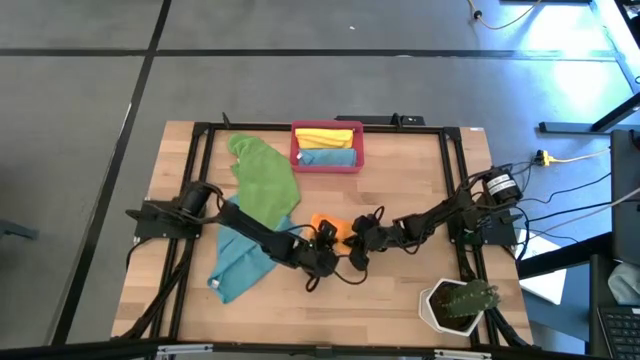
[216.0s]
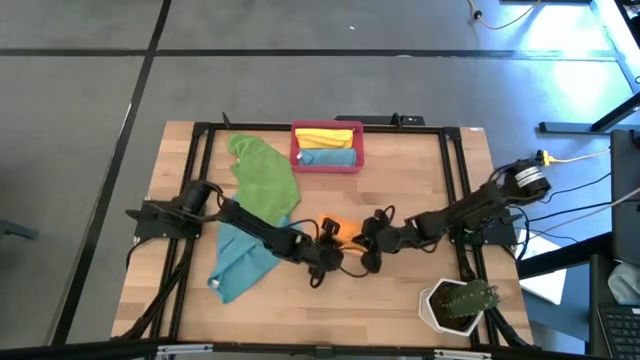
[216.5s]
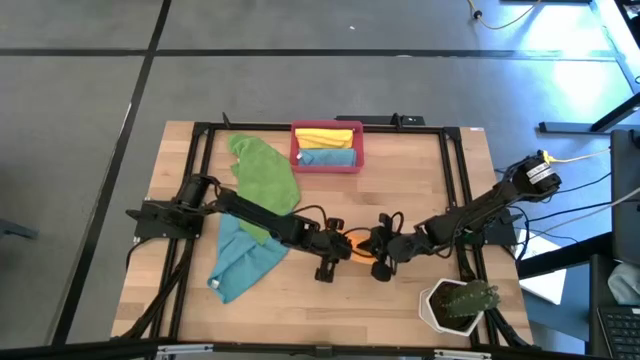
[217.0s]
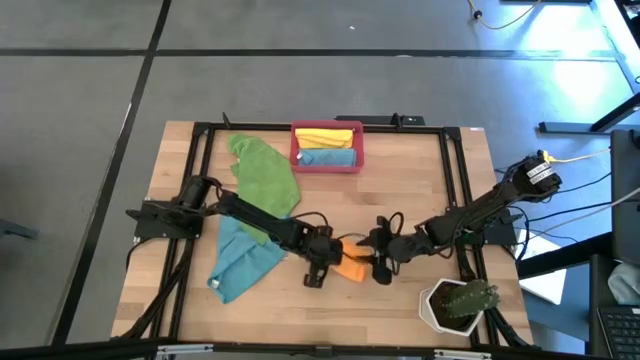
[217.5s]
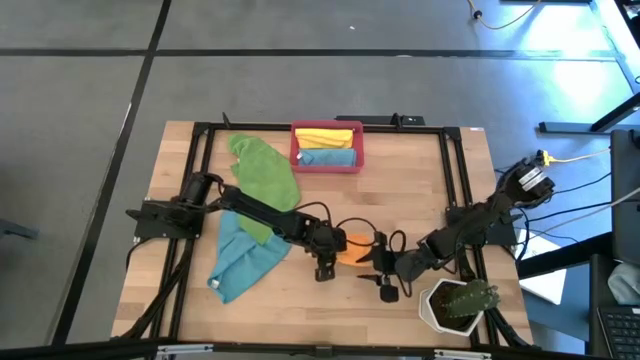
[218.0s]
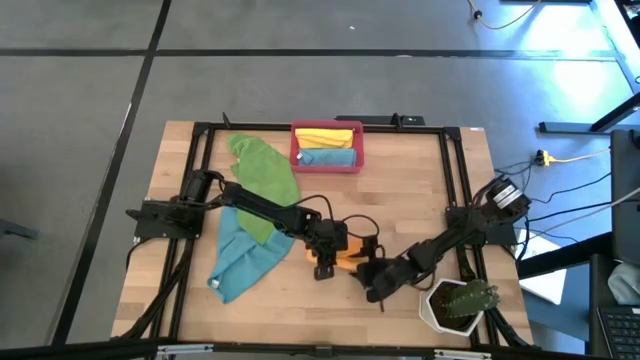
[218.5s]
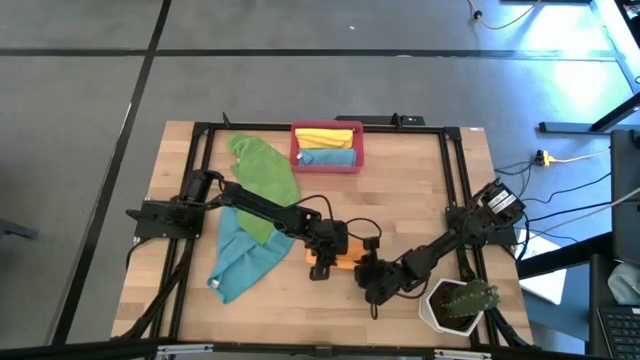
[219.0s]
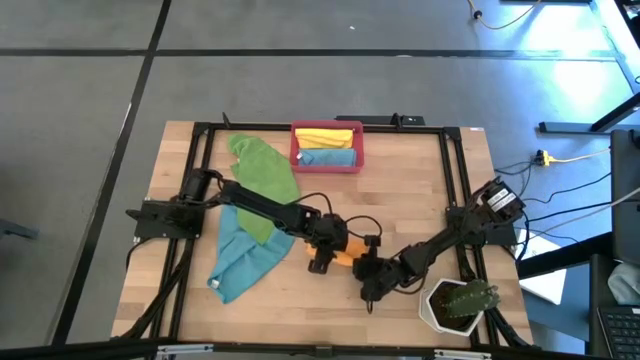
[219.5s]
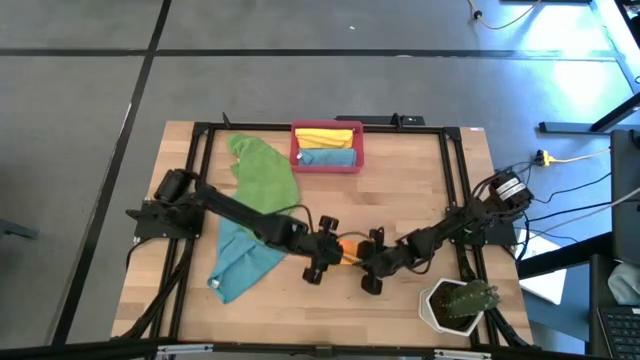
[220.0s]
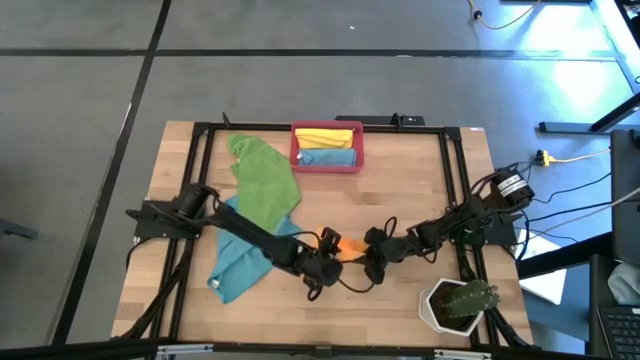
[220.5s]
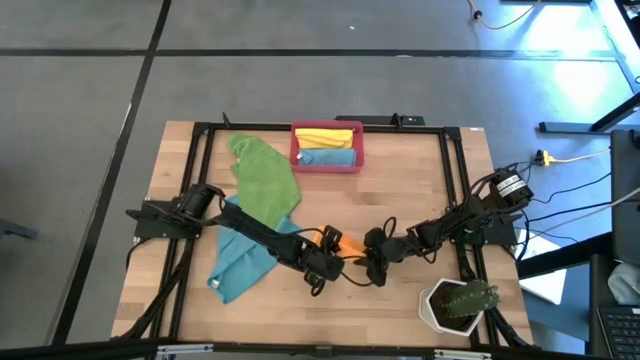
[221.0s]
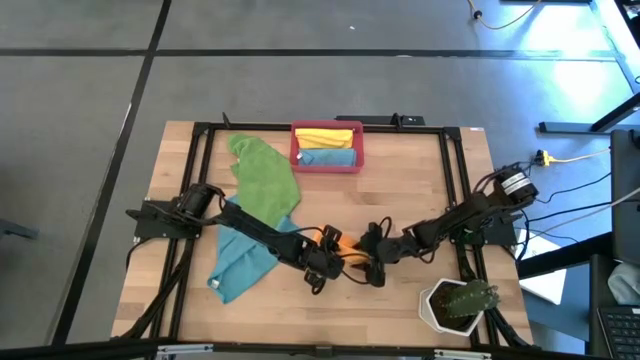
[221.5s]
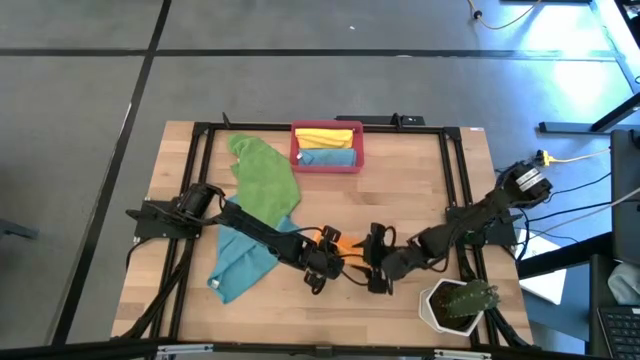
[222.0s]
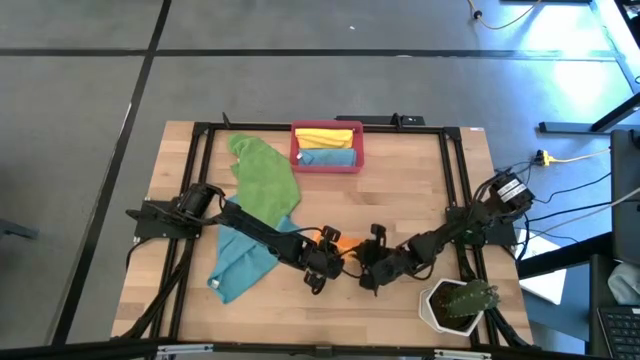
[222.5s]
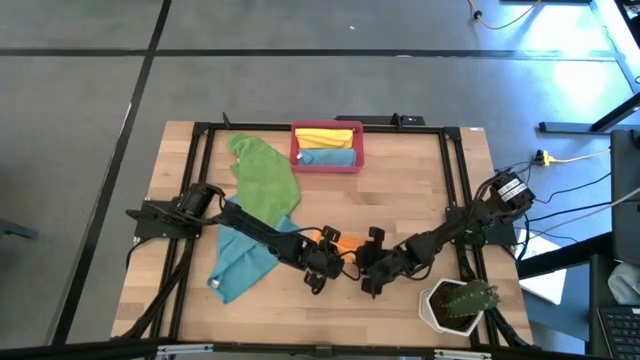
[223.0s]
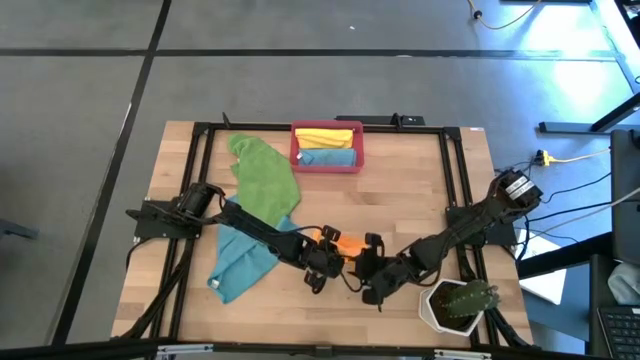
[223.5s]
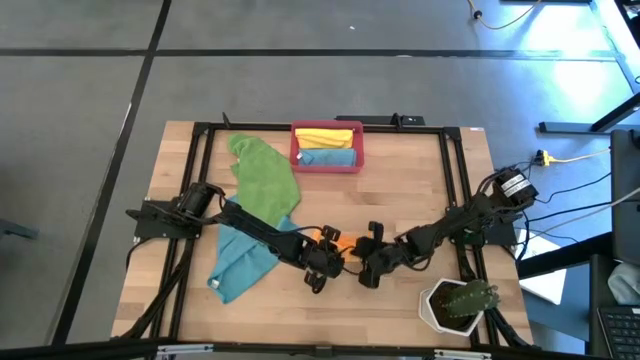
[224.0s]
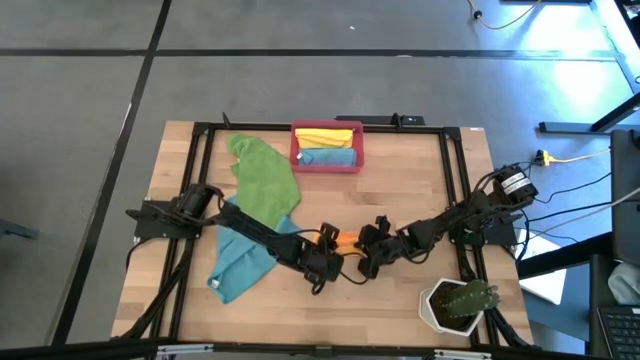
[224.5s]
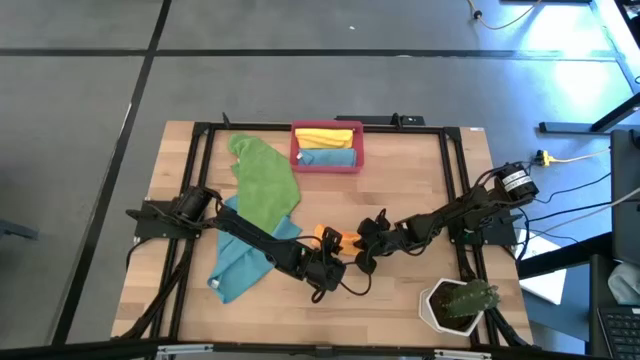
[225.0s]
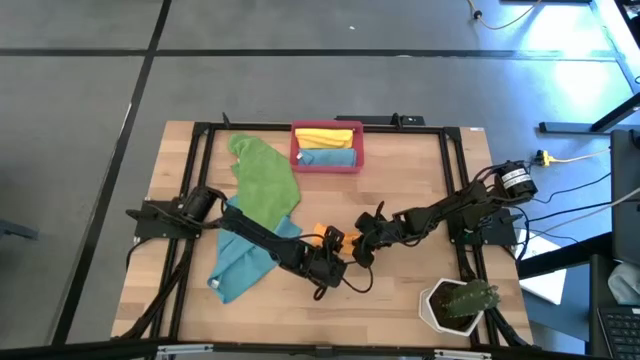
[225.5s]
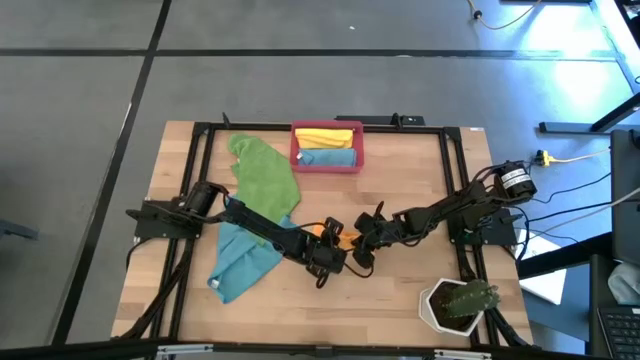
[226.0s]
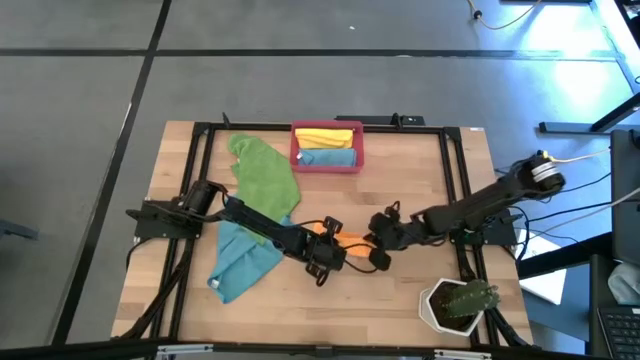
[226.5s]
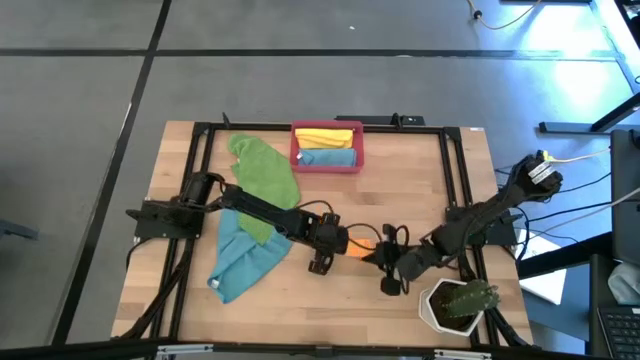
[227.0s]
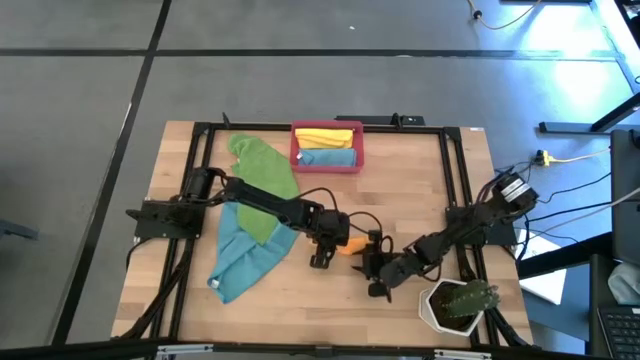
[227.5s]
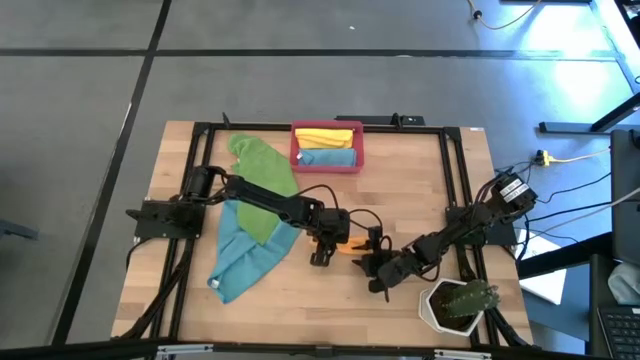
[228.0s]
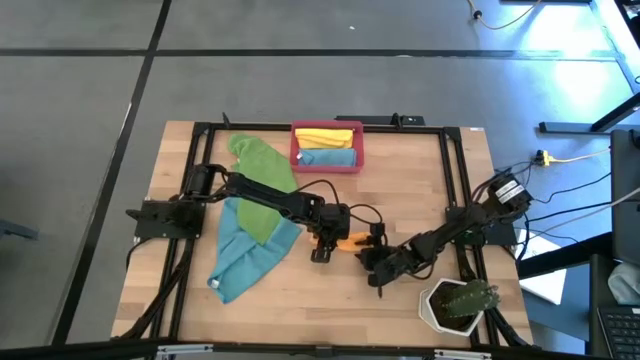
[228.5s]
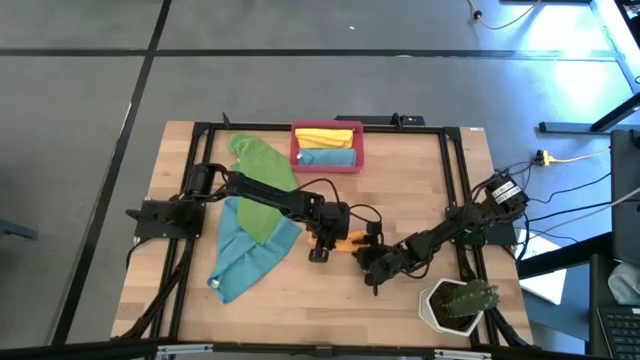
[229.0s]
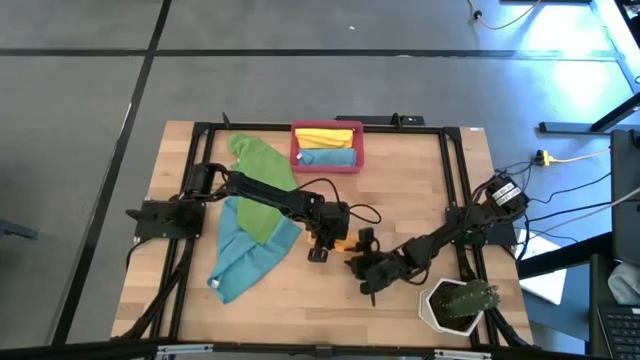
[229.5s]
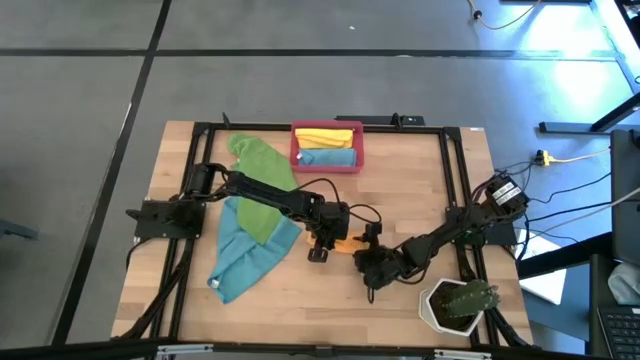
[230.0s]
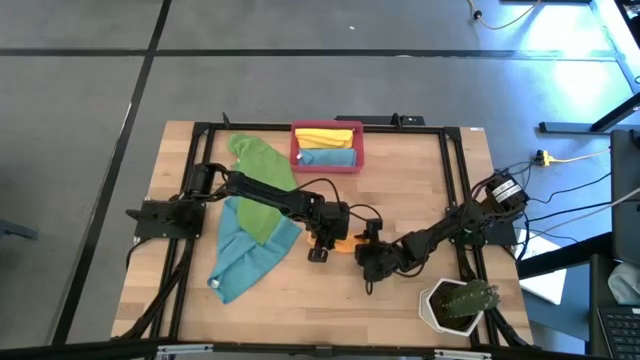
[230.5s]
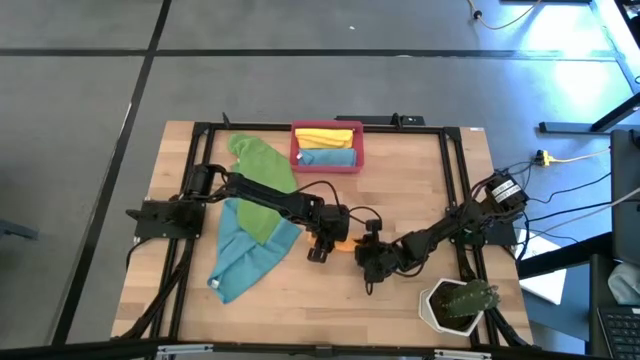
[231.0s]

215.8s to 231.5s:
Task: Roll microfiber towels into tight, uniform cylinder then place into a basket
Roll the orange microfiber towel

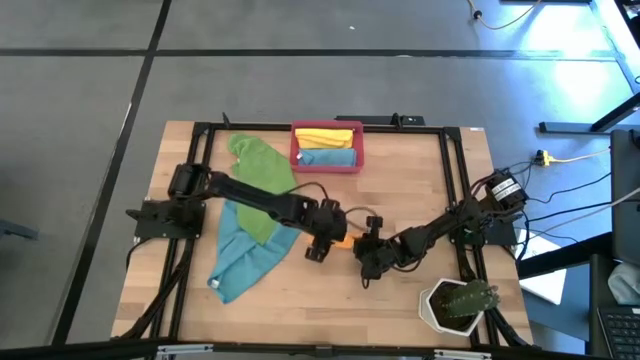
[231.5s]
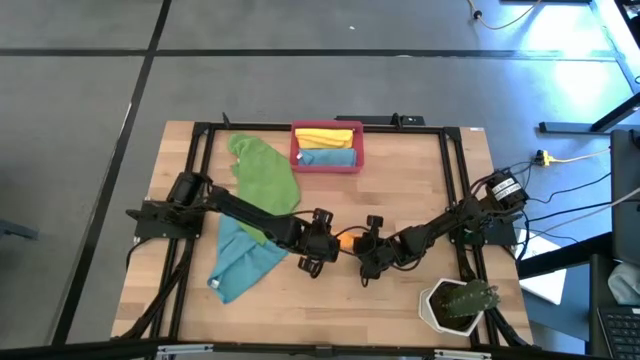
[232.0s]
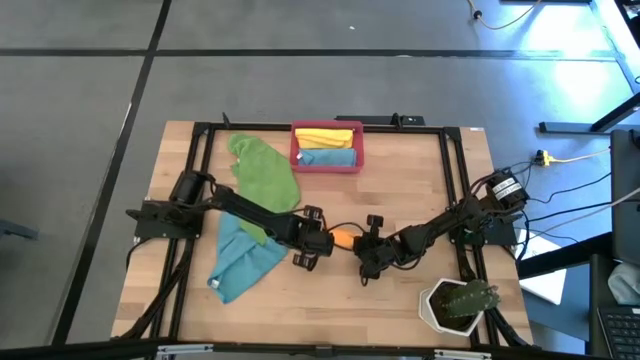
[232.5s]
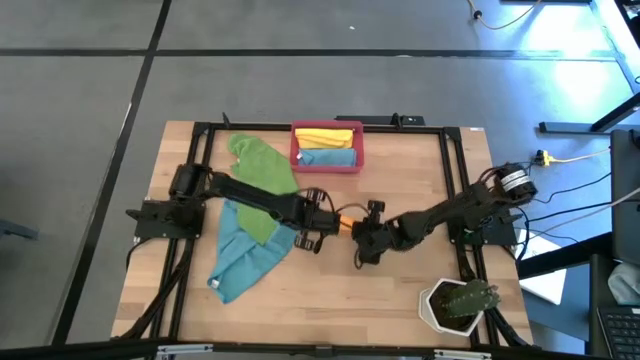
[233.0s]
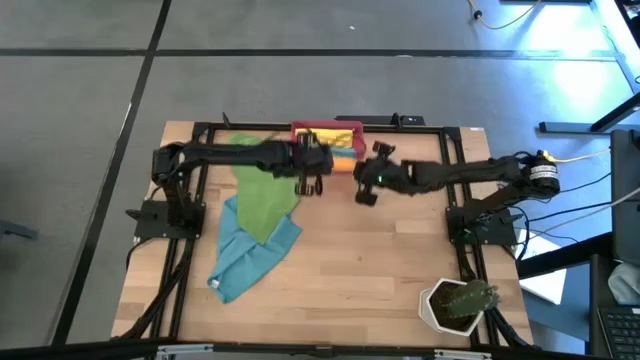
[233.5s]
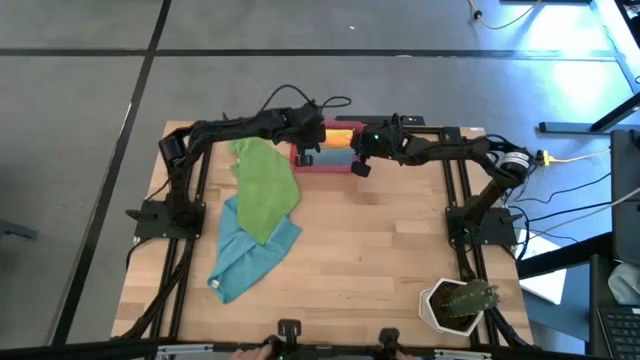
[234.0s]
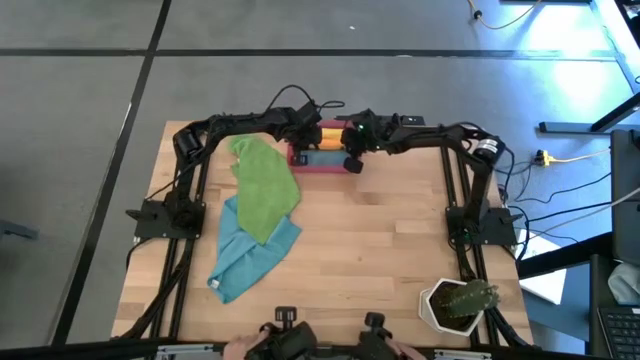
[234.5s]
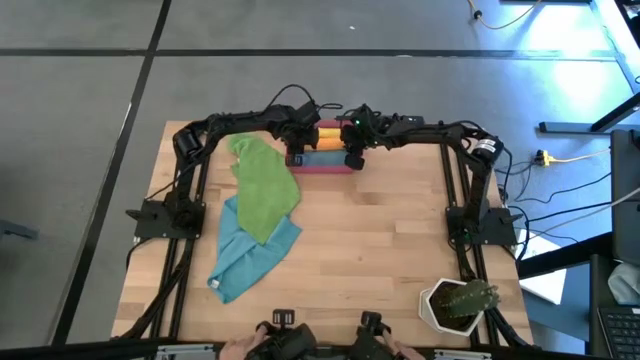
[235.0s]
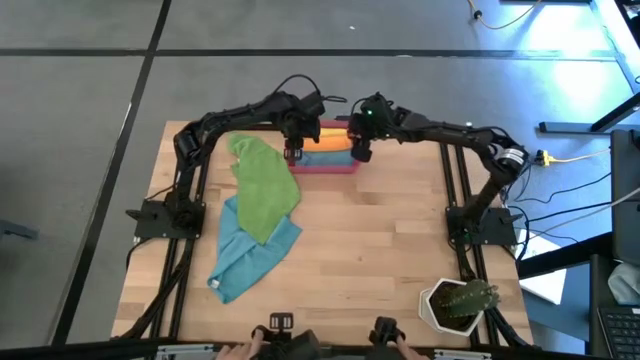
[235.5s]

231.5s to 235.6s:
Put the orange microfiber towel into the red bin

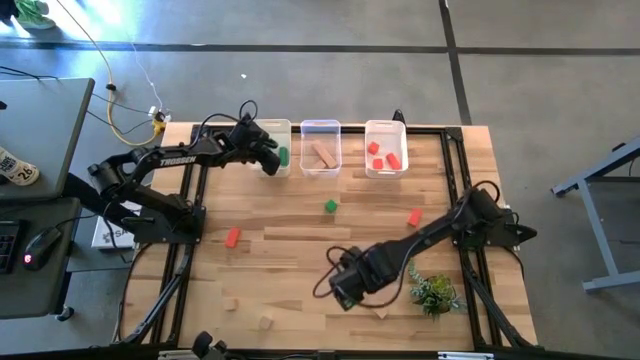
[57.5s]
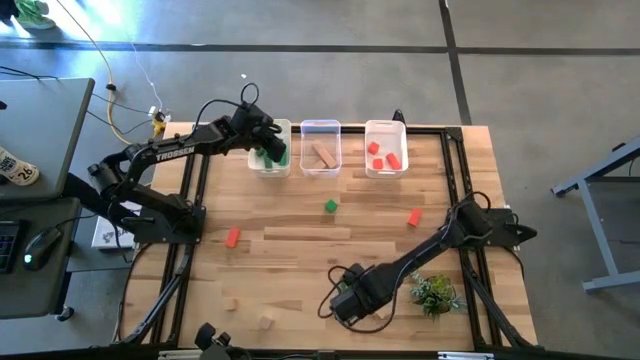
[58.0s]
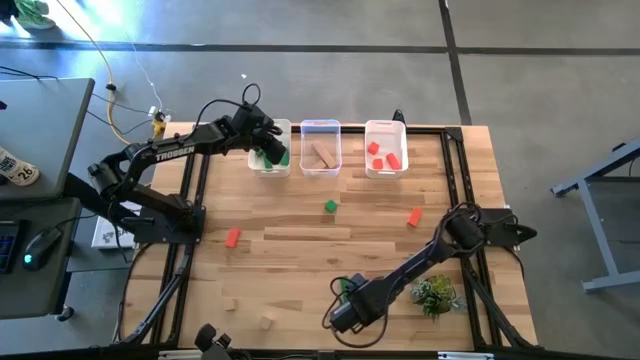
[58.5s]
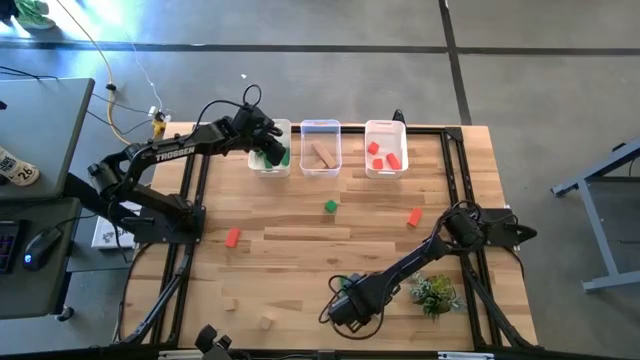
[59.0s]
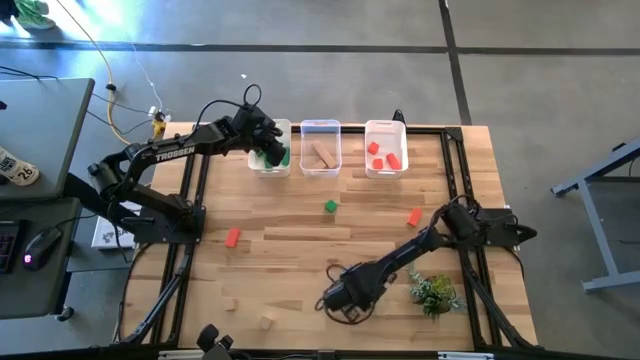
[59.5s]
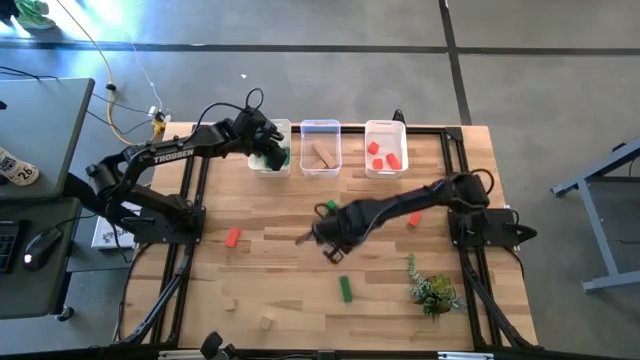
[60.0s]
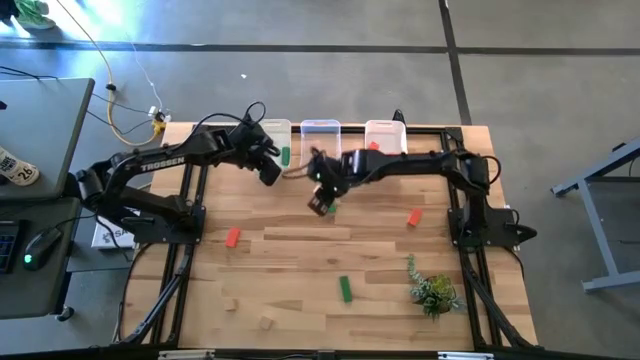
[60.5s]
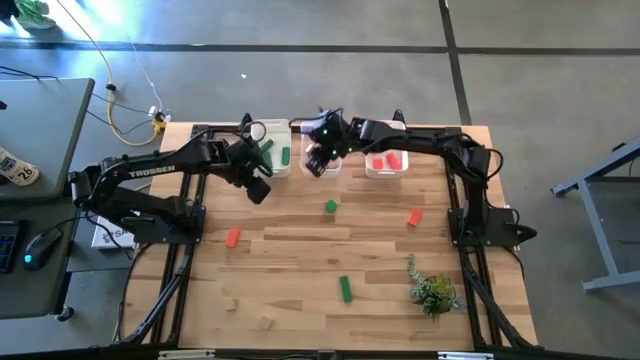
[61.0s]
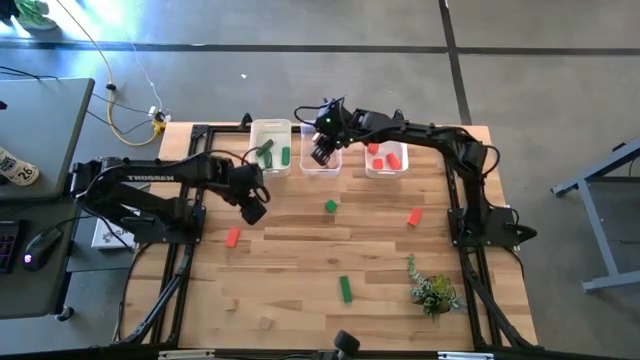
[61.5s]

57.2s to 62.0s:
Task: Sort & place blocks by color
Put the brown block into the transparent bin
